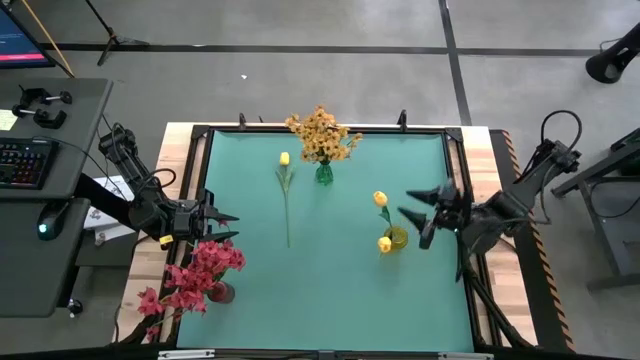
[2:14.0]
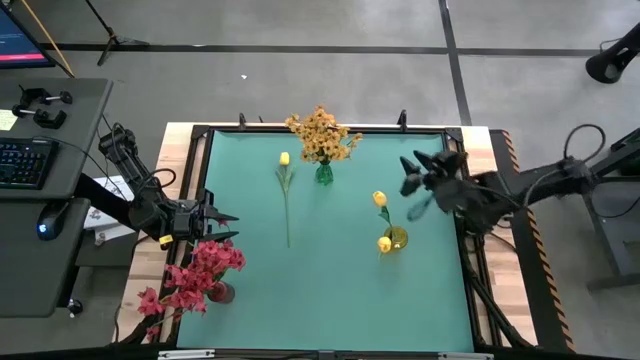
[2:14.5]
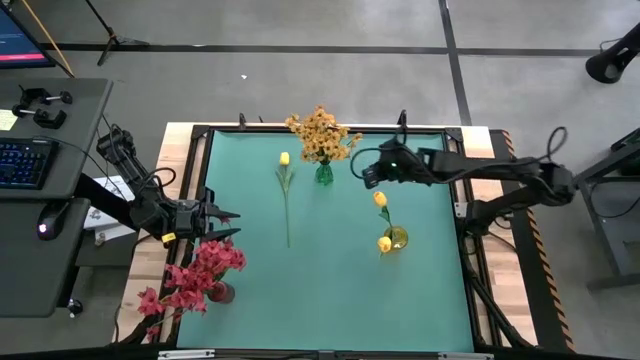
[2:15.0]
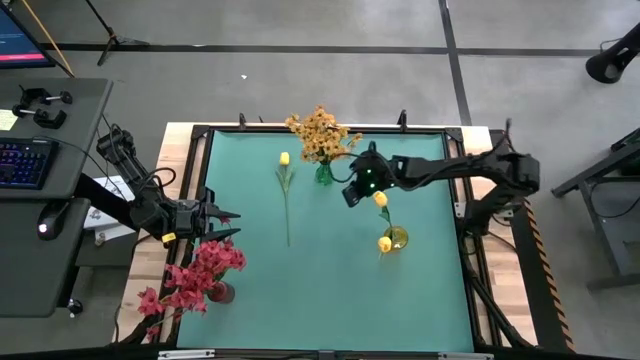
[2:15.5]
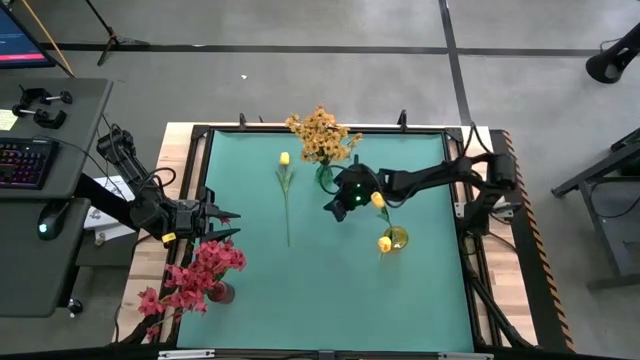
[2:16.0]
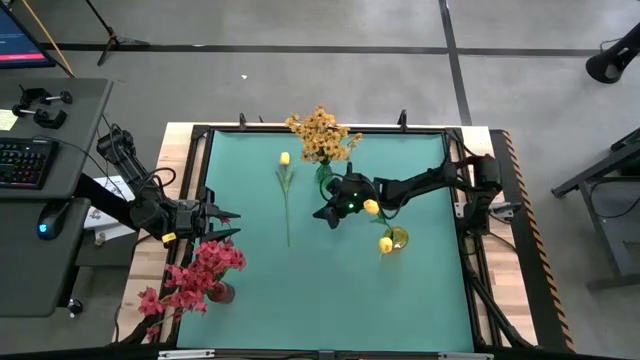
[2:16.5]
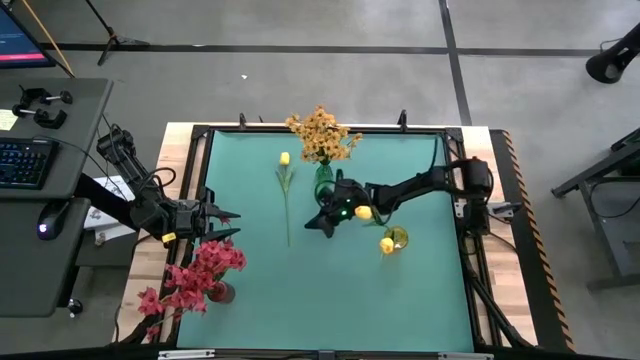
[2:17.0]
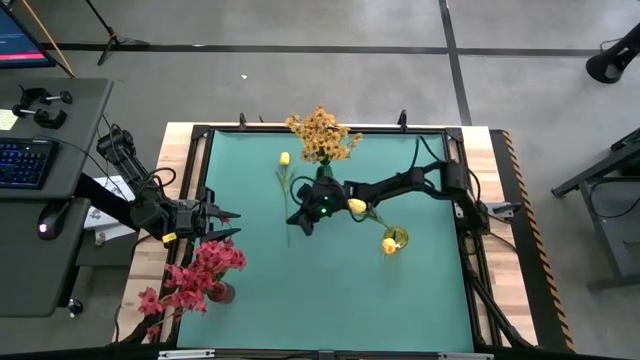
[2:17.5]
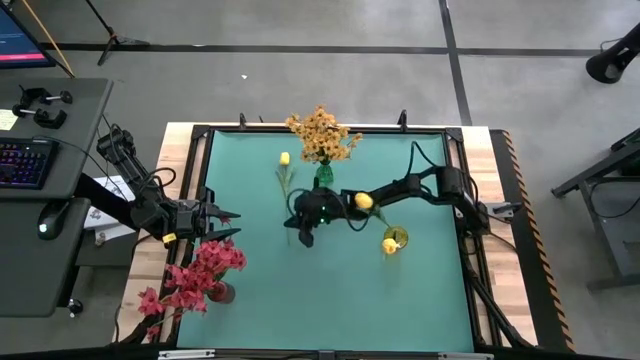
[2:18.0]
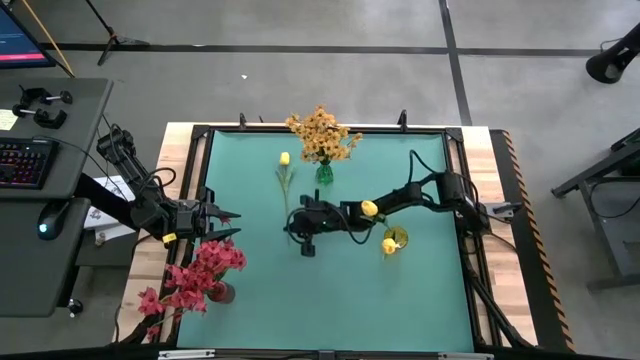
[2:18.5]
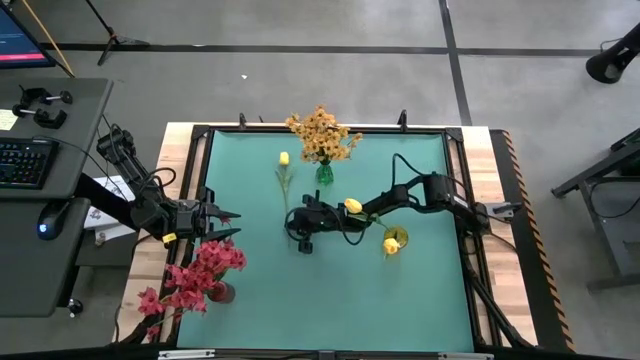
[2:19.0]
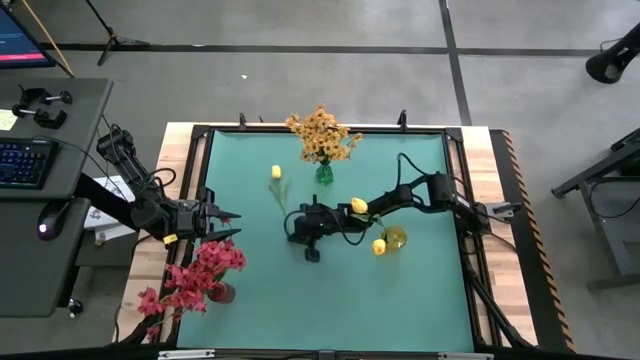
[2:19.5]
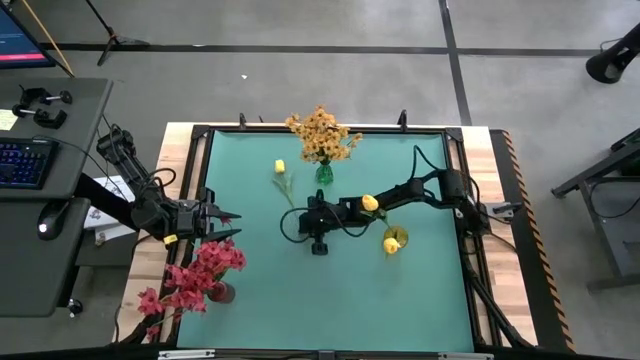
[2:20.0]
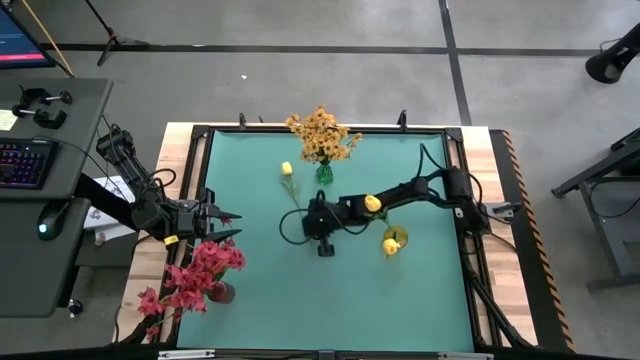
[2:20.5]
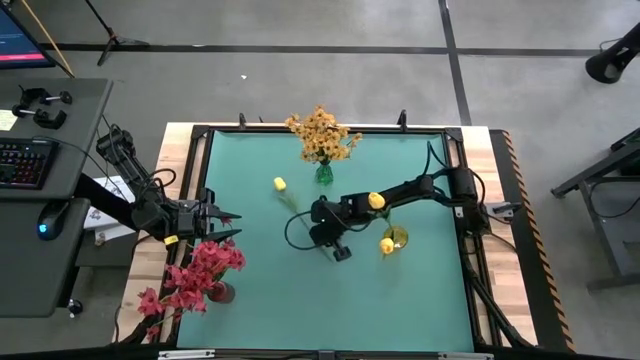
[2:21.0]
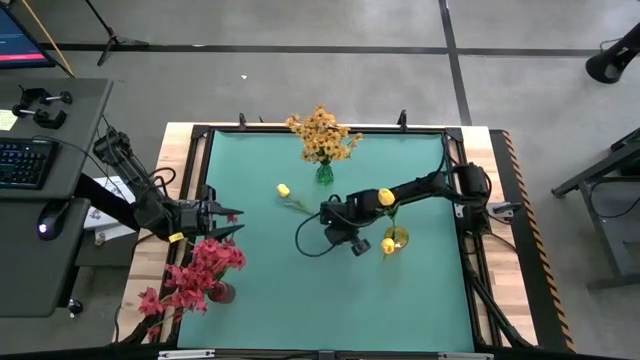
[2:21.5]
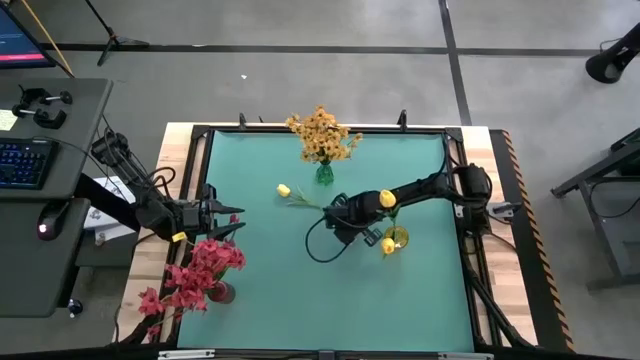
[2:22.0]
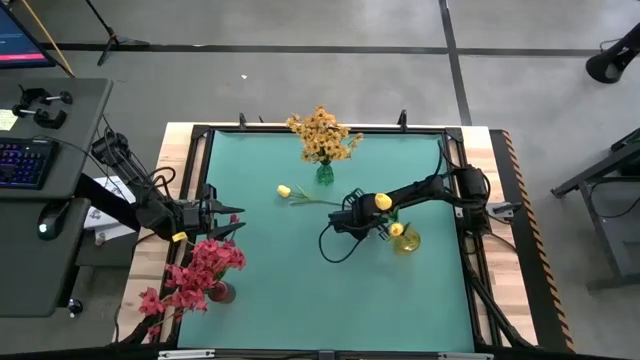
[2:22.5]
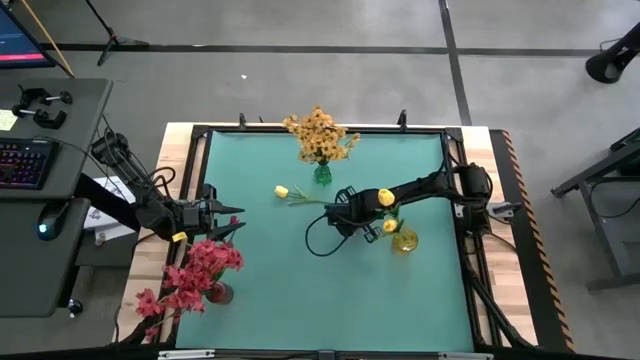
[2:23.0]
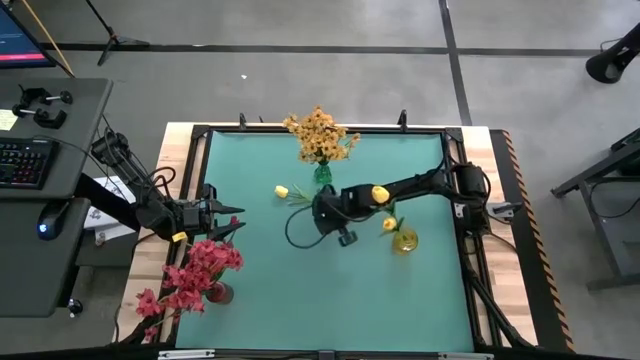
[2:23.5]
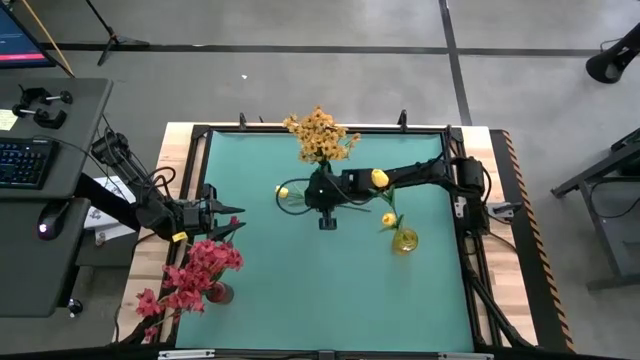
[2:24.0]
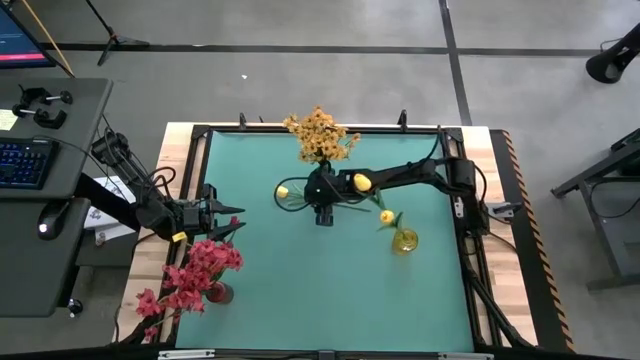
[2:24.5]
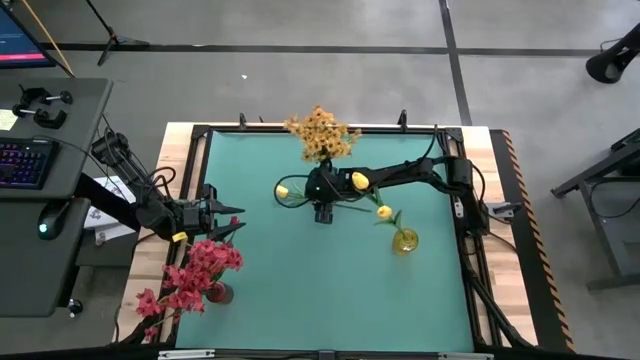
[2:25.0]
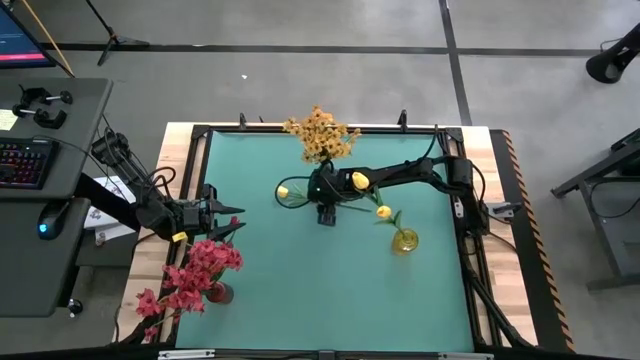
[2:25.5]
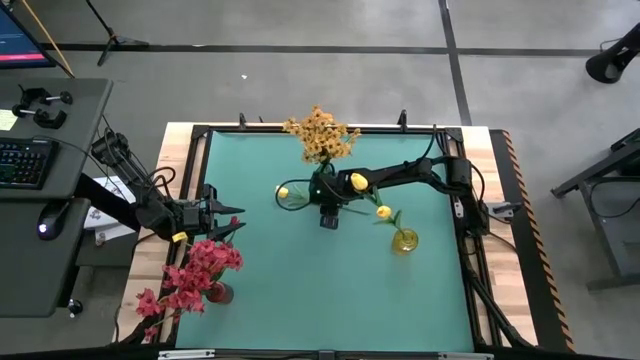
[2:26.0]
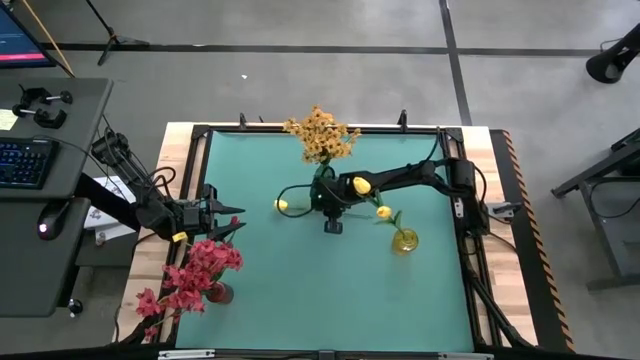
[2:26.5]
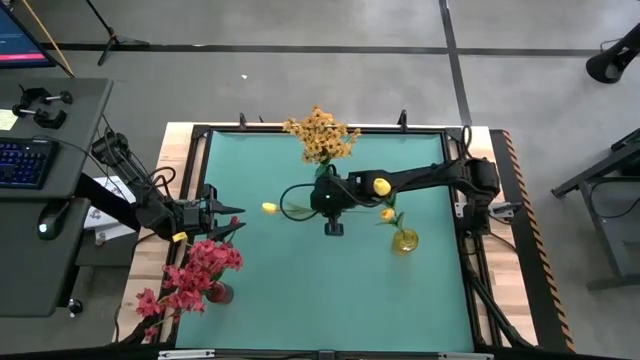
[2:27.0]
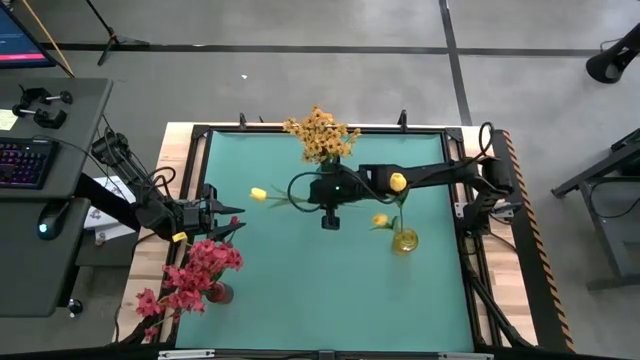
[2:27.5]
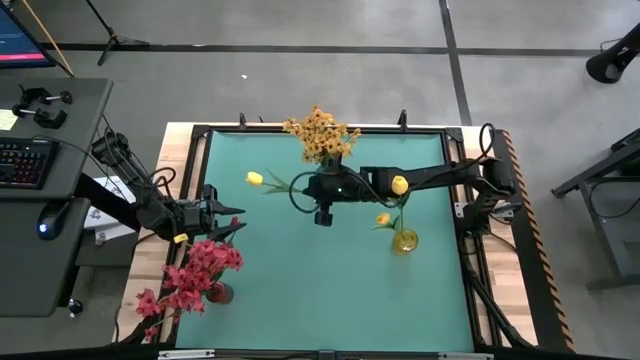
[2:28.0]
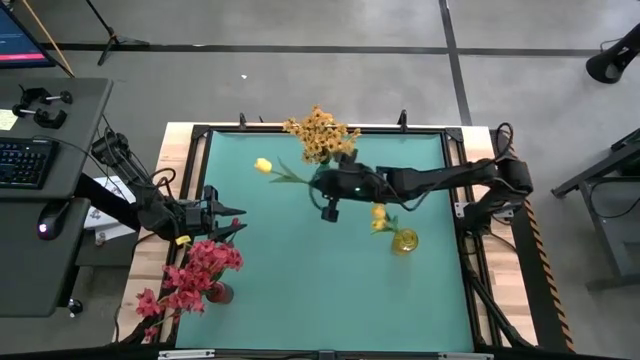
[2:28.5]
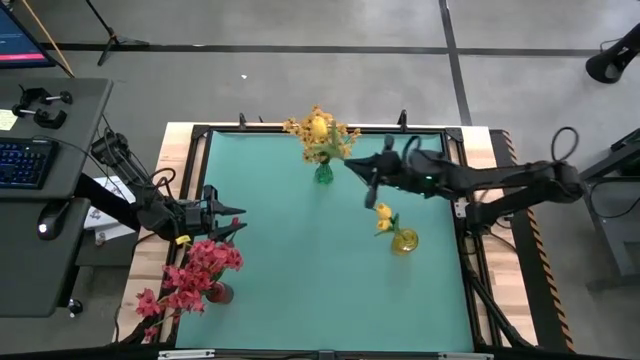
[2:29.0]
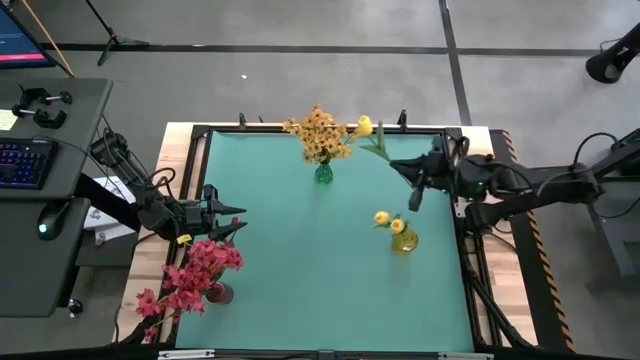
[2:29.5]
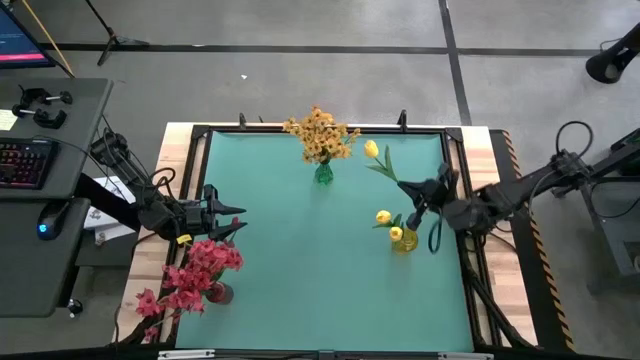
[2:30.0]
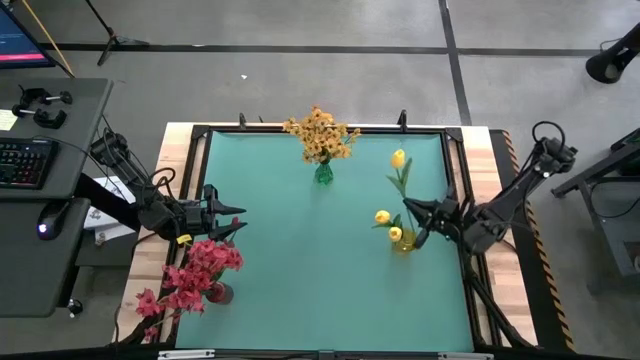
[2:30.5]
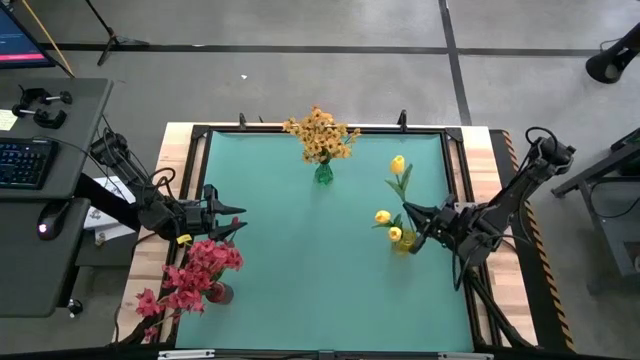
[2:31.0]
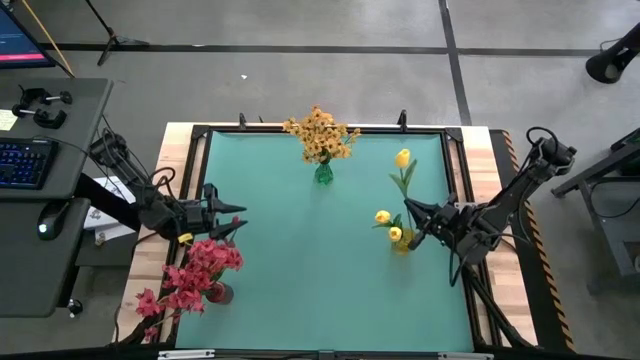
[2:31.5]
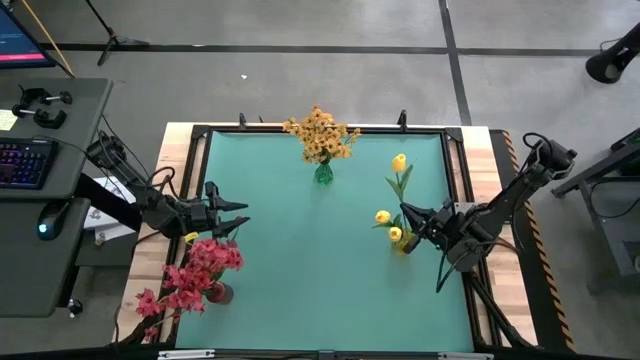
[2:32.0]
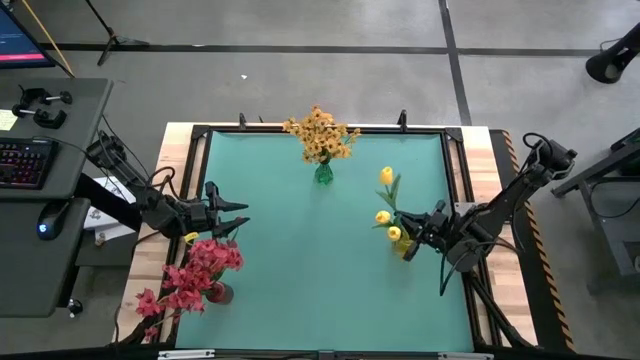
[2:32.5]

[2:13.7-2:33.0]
Task: Sort flowers into vase by color
Put the light yellow flower into the yellow flower

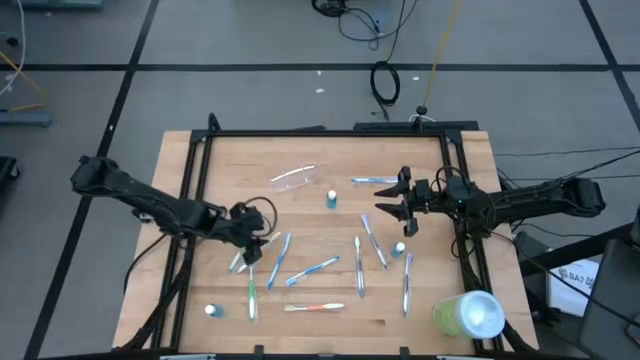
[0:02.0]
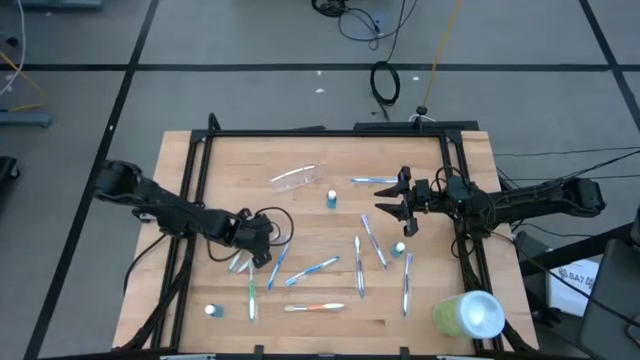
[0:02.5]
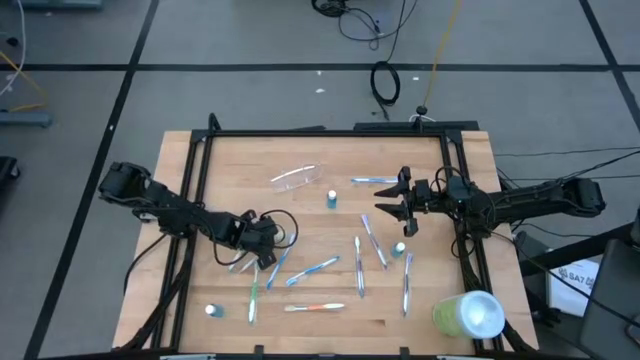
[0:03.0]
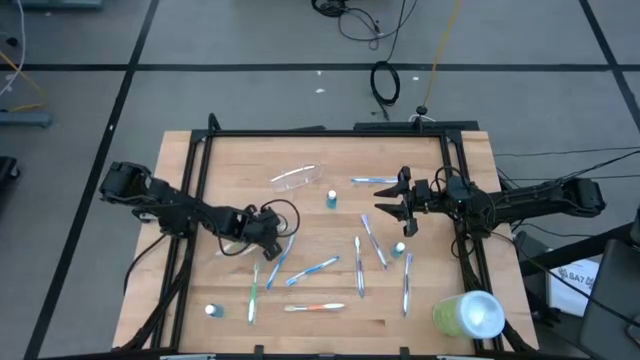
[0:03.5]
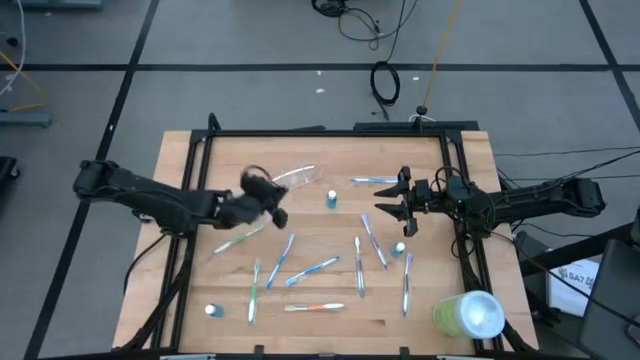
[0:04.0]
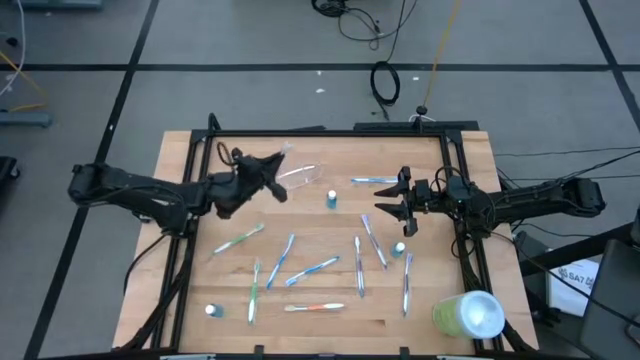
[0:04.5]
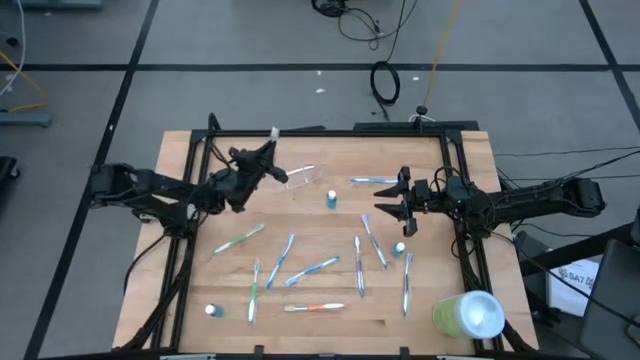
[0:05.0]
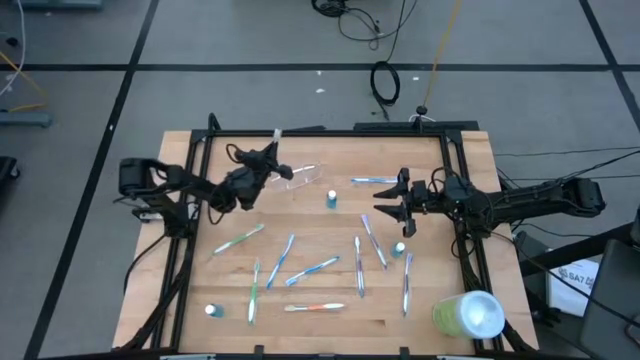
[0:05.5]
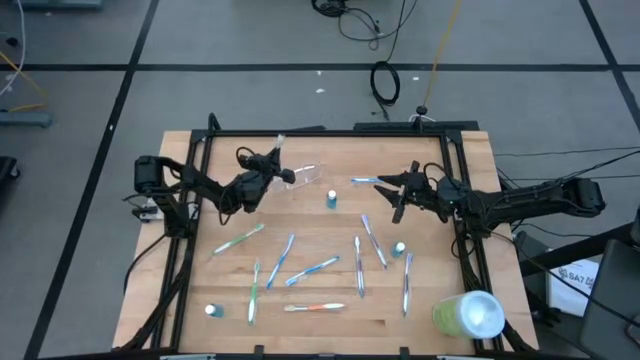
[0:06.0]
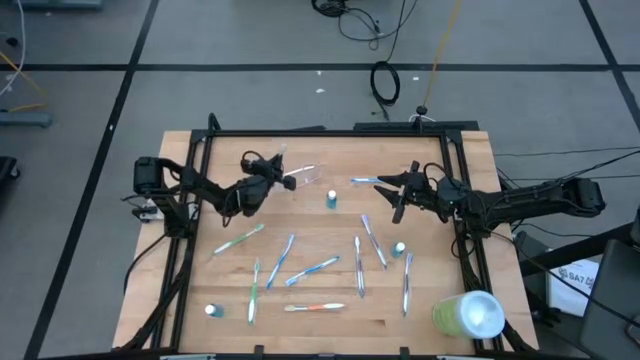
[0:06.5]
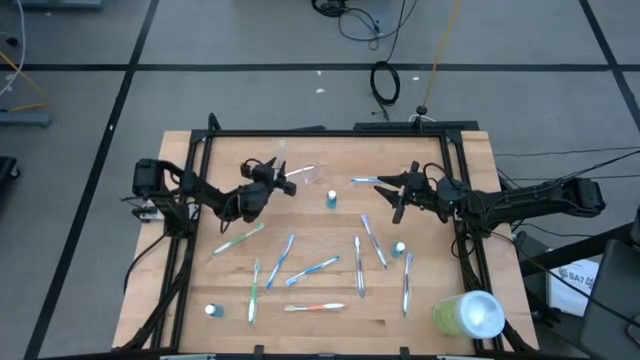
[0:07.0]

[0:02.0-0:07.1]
Task: Pick & Place toothbrushing station
Put the top orange toothbrush into the transparent organizer
